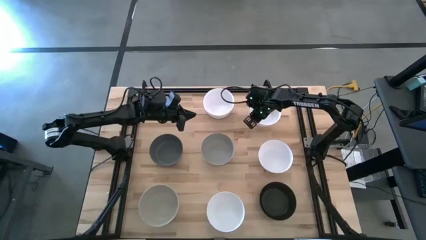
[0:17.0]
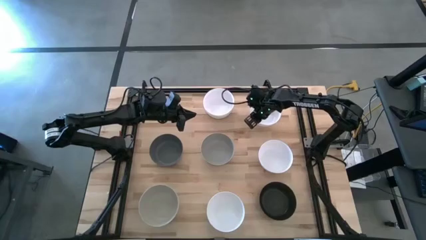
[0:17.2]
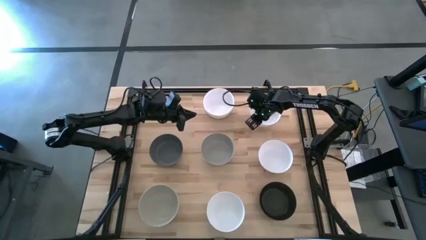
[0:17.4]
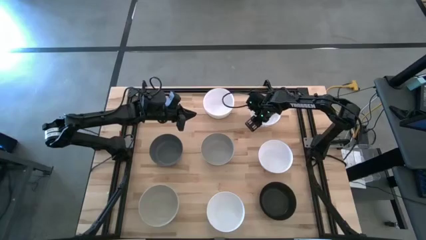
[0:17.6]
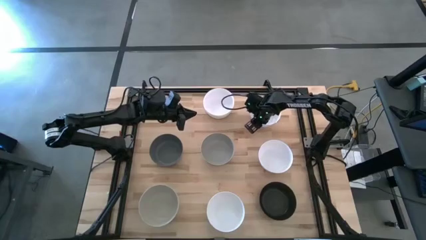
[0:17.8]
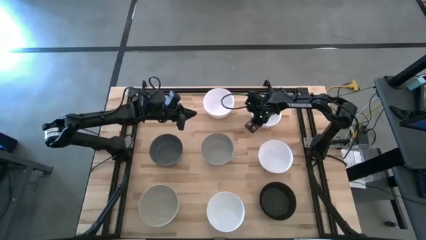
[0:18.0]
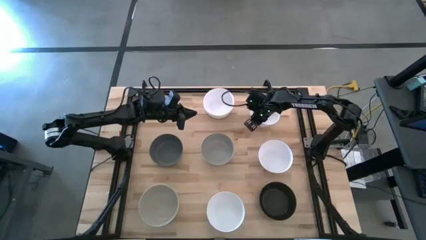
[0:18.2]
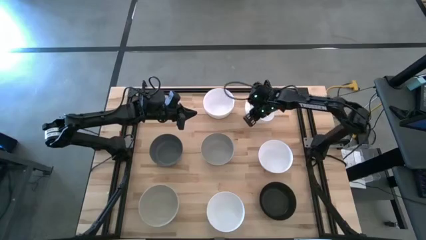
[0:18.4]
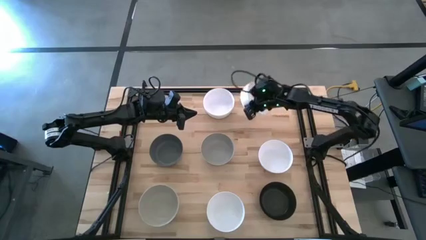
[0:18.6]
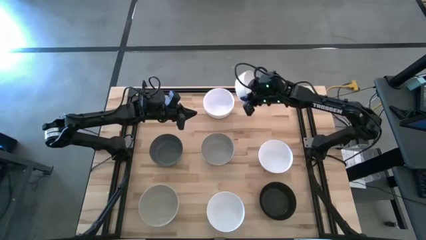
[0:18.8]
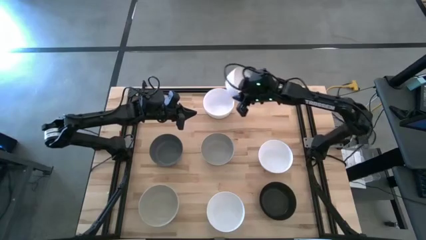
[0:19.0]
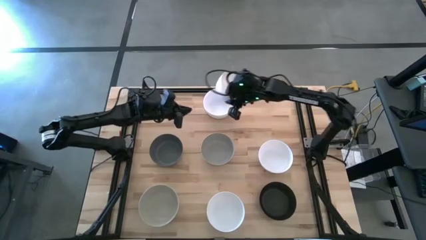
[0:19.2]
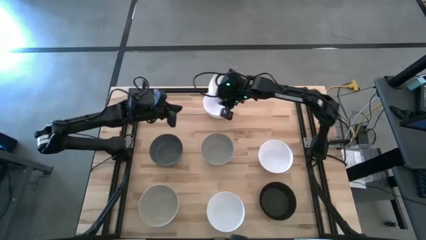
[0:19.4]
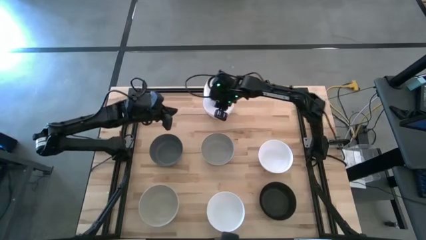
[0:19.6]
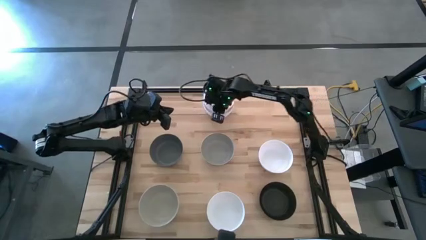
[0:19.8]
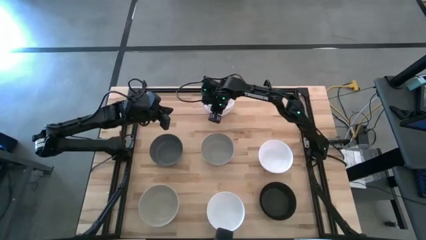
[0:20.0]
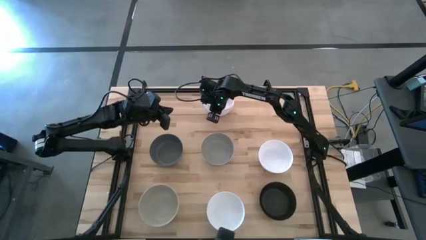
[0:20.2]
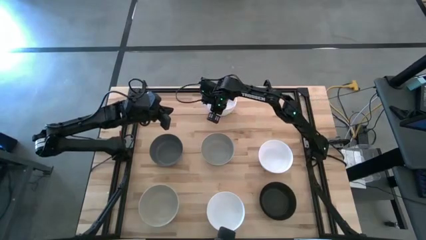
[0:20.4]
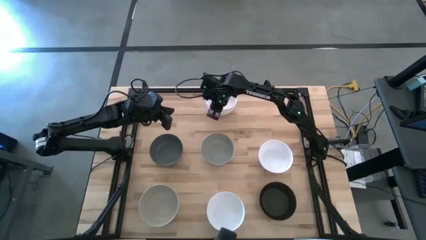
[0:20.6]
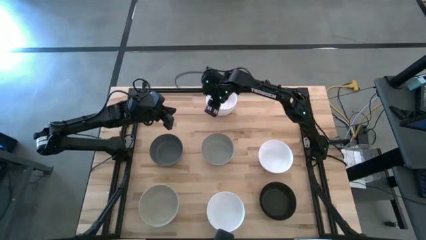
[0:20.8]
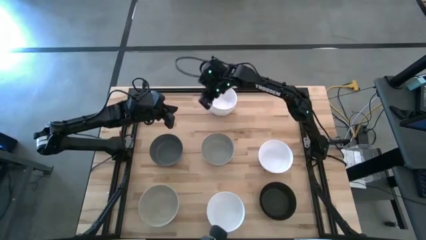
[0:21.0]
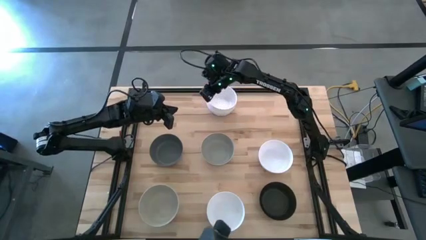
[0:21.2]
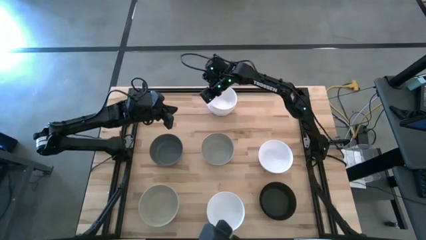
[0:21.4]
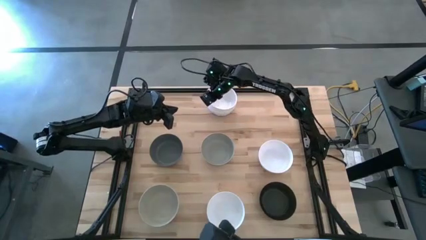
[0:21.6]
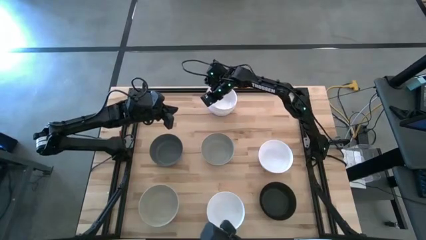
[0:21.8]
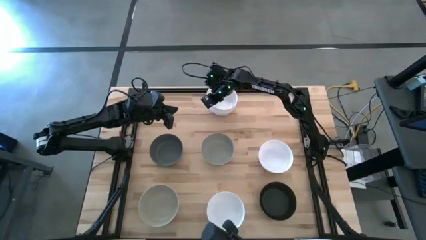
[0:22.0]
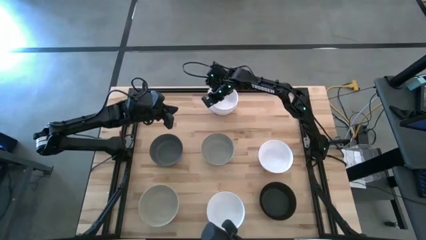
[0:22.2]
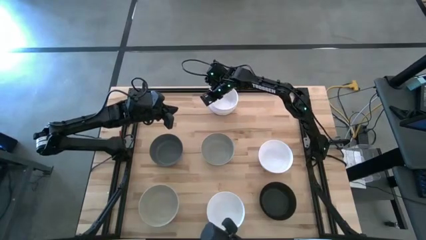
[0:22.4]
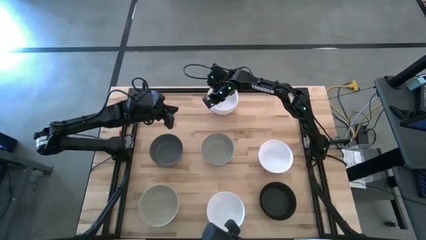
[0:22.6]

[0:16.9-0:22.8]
Task: Nest bowls inside each other
Stack the white bowl on the stacked white bowl

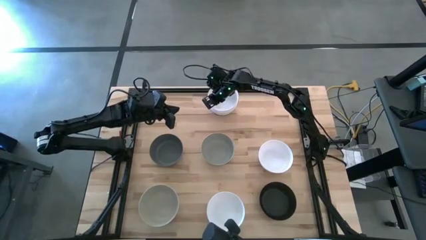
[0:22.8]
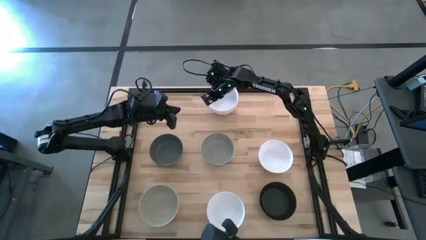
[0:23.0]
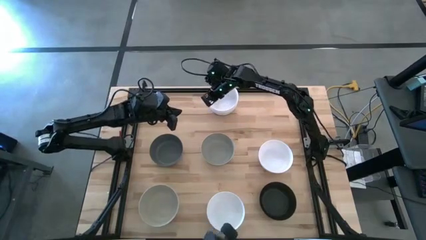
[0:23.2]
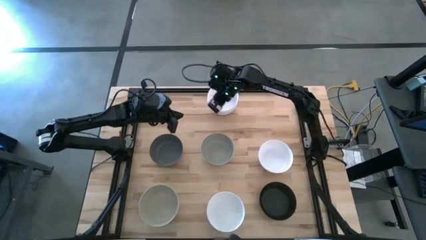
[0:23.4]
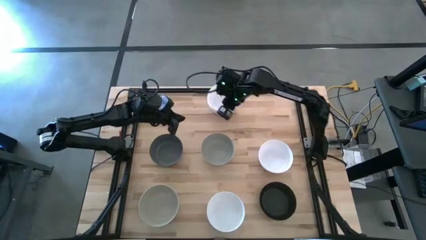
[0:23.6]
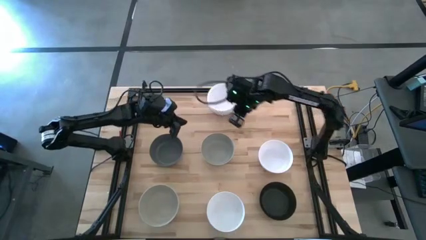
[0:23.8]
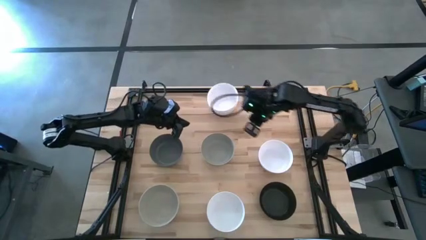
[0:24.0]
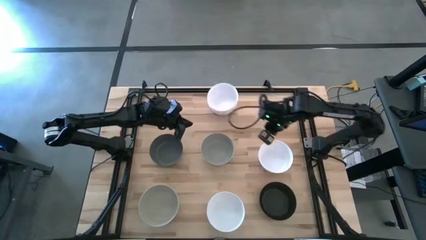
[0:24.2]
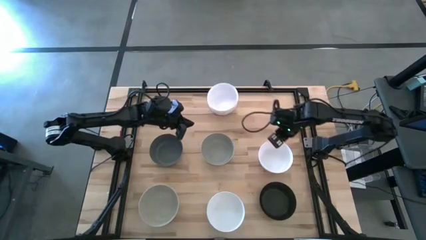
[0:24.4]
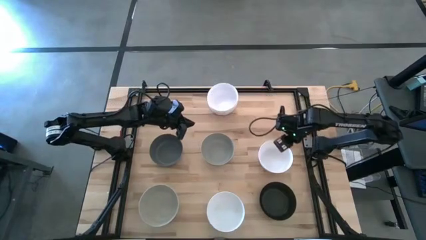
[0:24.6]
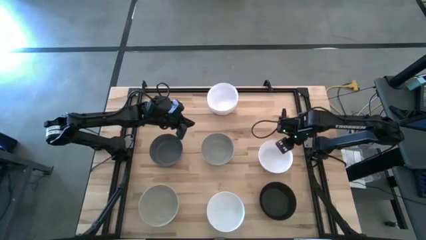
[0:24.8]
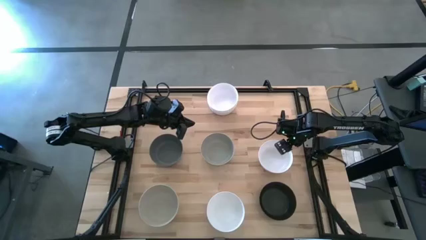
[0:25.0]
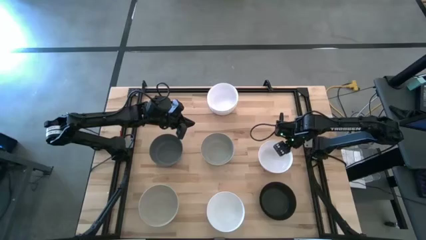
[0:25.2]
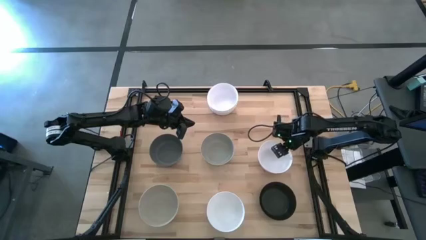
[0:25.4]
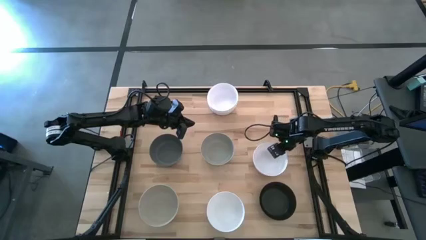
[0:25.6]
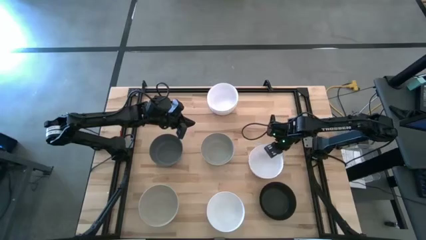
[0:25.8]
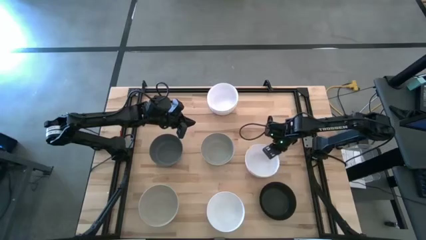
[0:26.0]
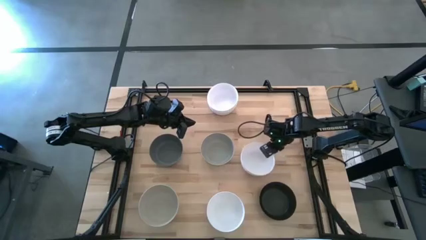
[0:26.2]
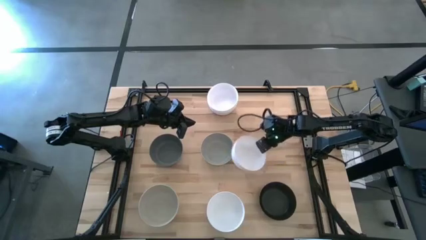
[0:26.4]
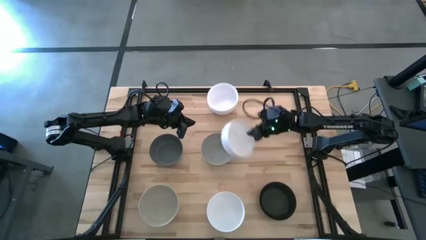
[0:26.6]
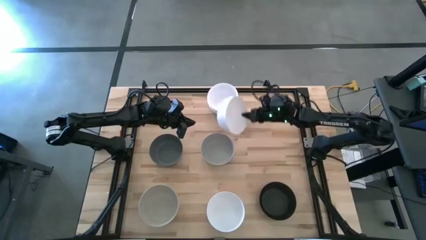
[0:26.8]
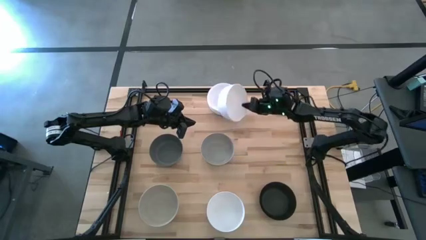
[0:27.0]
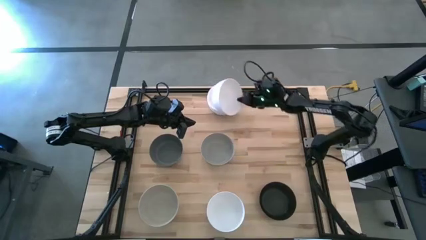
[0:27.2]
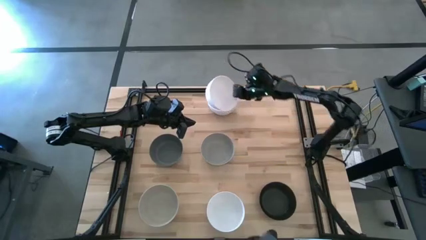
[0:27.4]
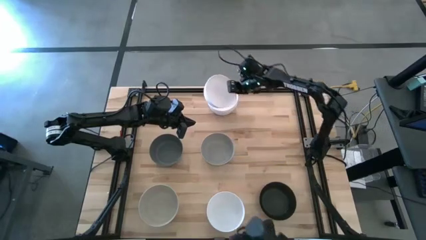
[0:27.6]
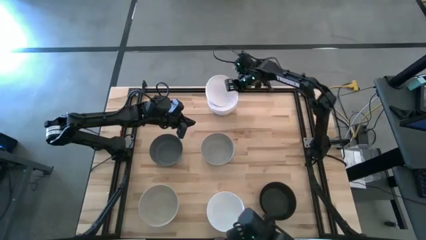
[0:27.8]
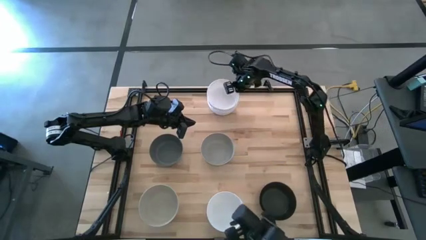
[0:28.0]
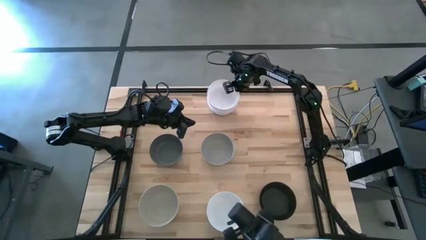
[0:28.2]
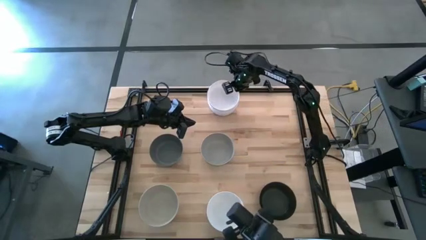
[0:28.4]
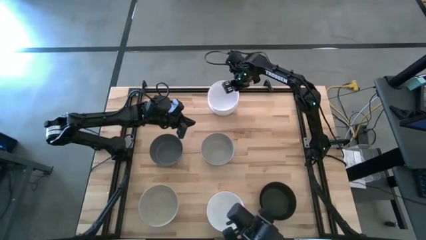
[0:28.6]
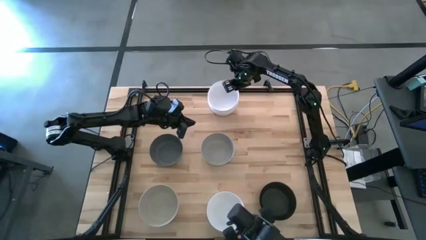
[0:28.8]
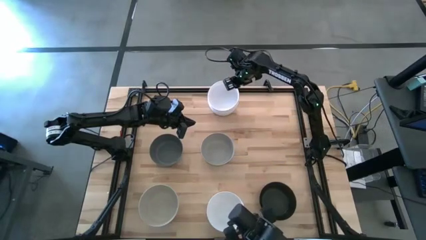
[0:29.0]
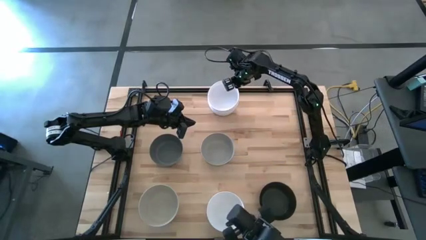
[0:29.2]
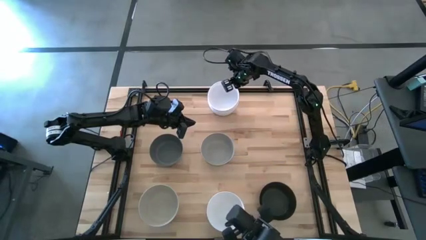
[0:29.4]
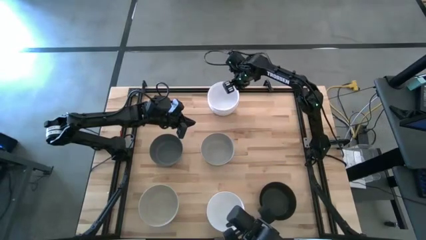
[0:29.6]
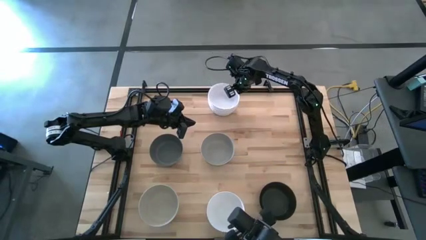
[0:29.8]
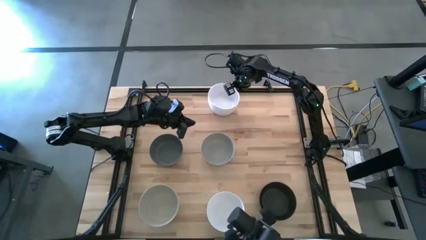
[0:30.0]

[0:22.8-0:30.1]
Stack the white bowl on the stacked white bowl
